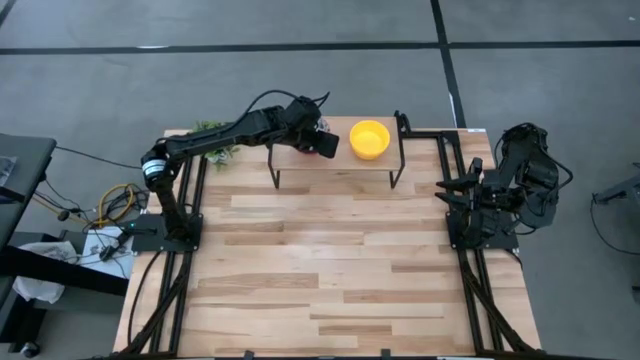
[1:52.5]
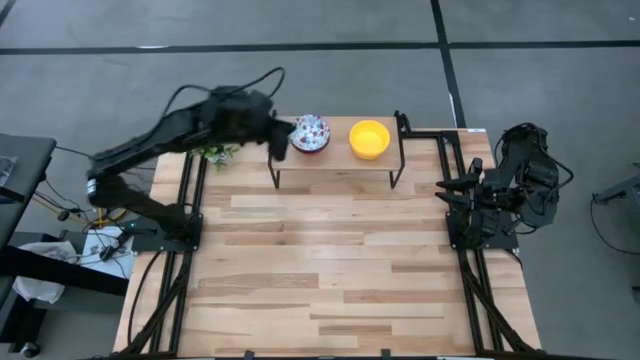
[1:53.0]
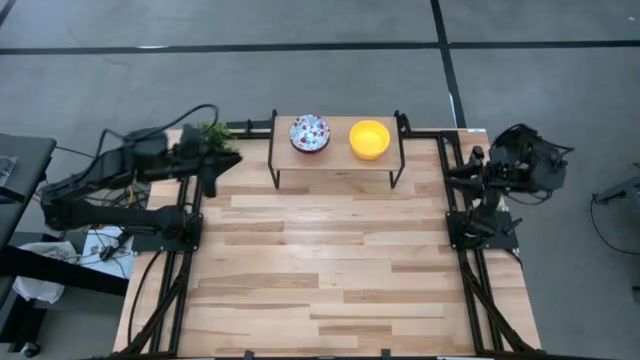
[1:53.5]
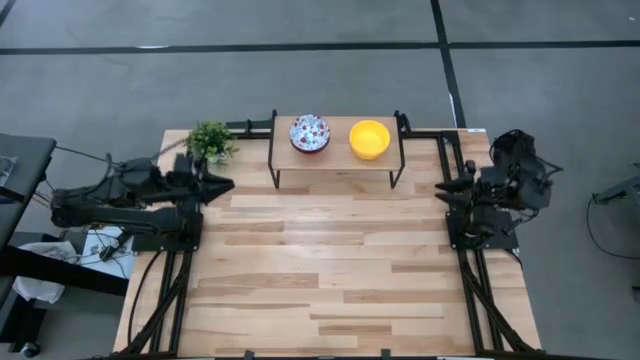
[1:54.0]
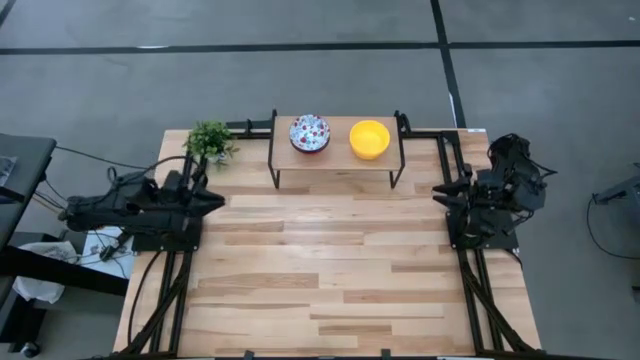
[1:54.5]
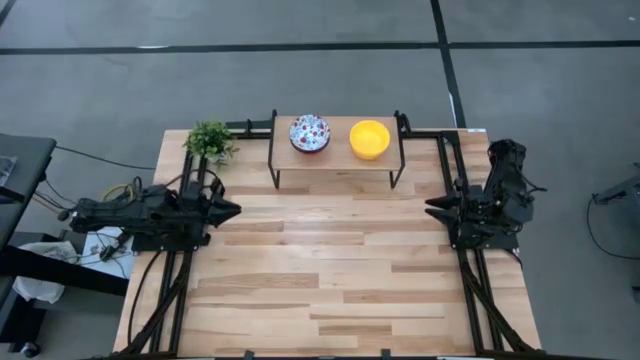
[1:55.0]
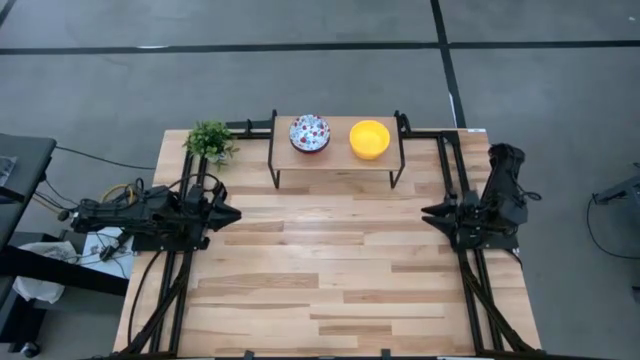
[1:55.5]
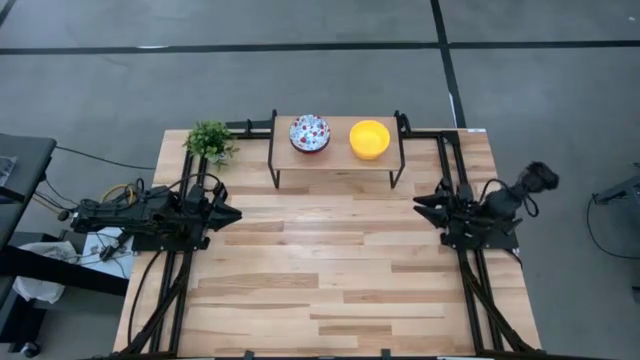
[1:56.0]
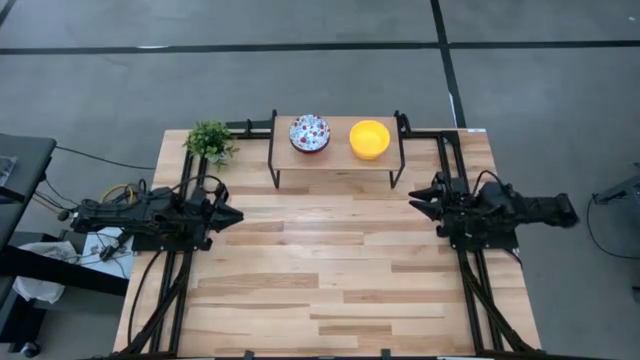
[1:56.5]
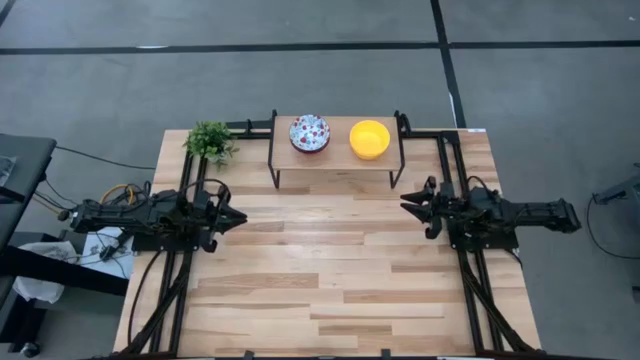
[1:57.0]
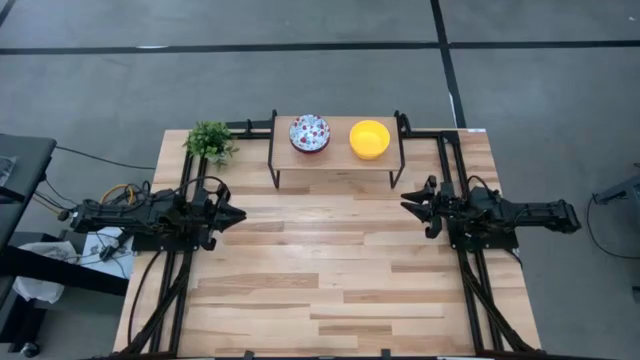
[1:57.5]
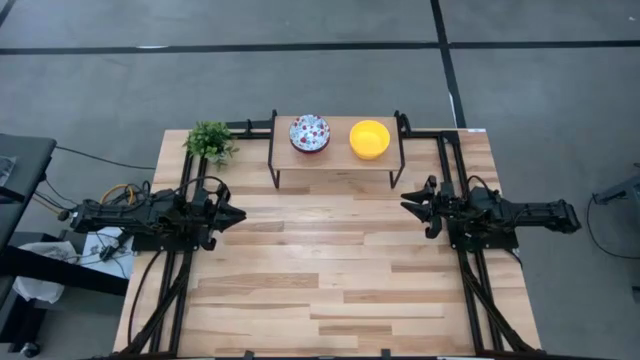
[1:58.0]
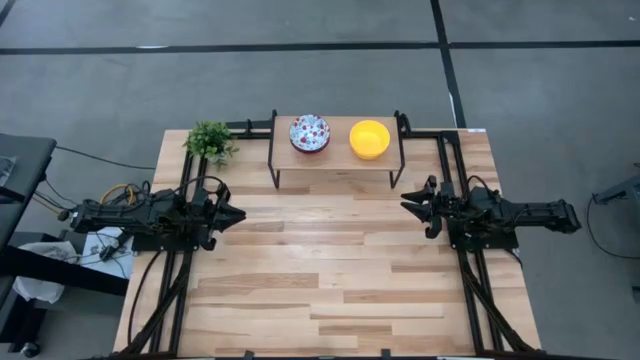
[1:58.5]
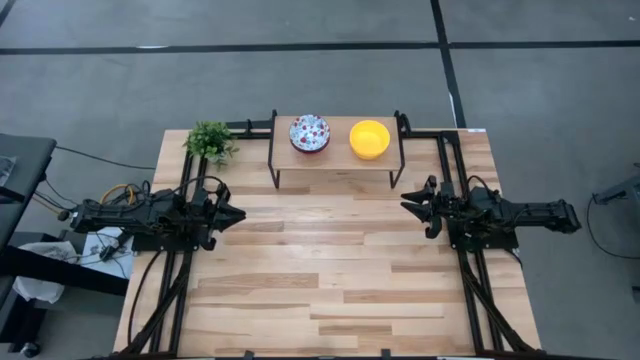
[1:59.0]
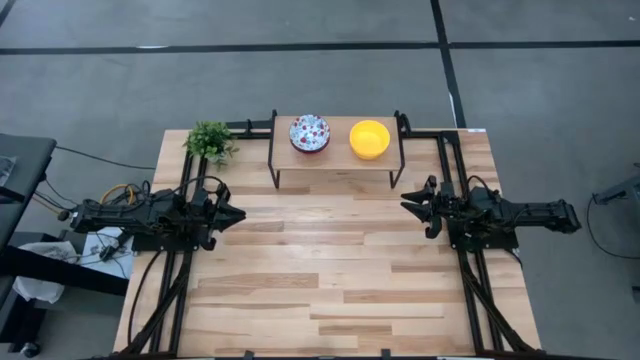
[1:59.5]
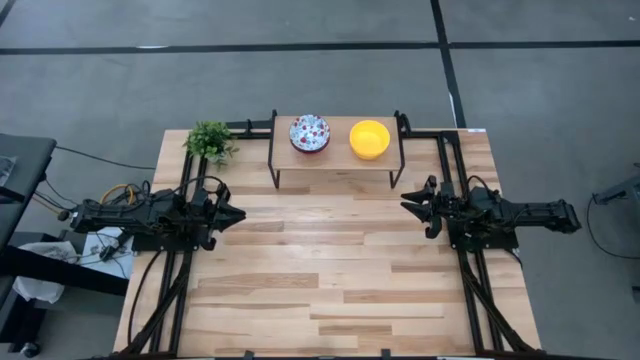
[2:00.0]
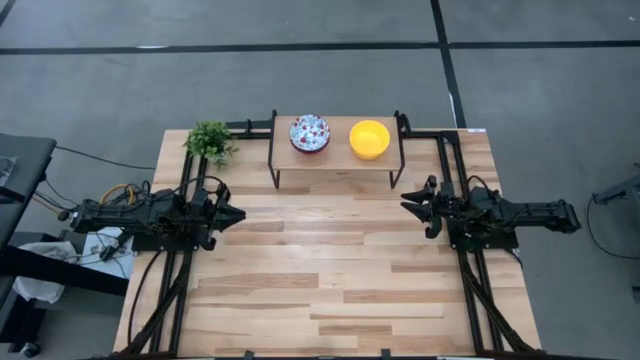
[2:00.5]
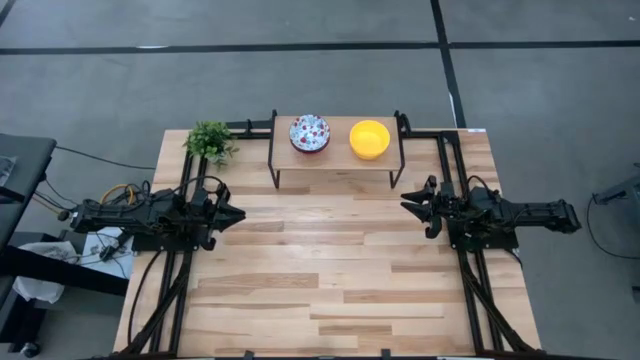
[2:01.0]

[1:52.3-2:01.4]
Task: Pick & Place Mini bowls
Return to Home Position

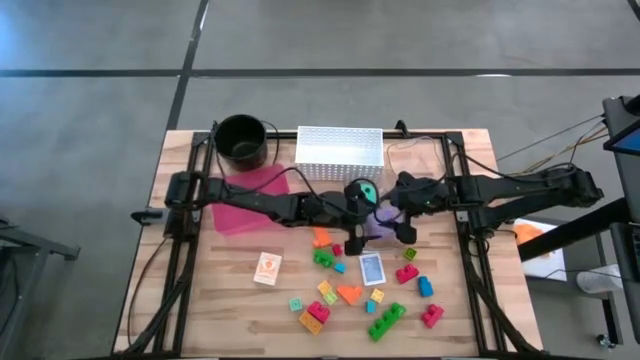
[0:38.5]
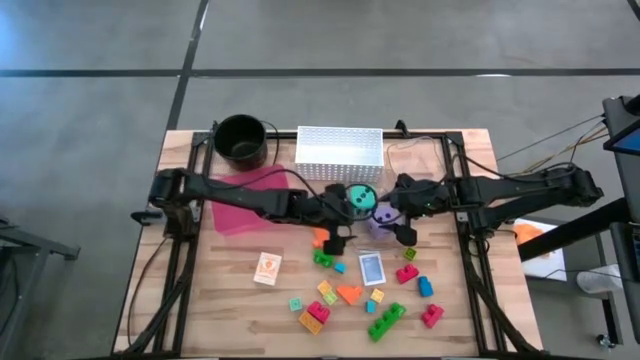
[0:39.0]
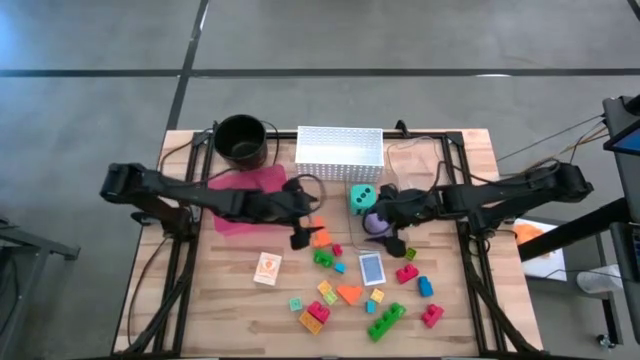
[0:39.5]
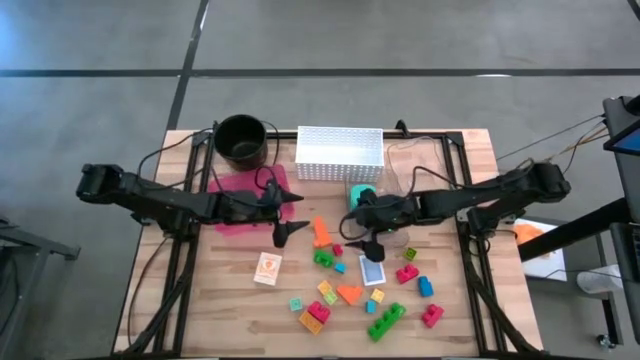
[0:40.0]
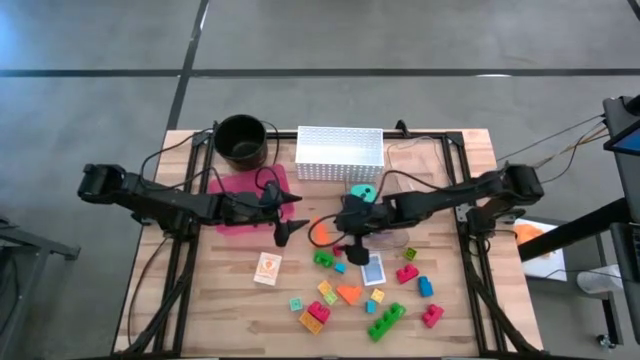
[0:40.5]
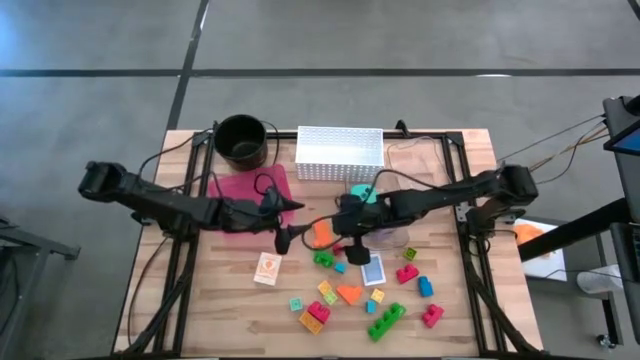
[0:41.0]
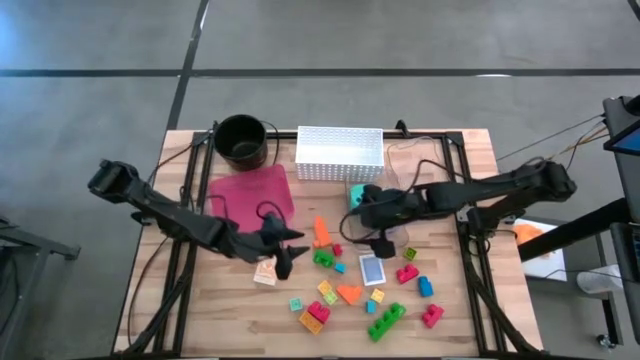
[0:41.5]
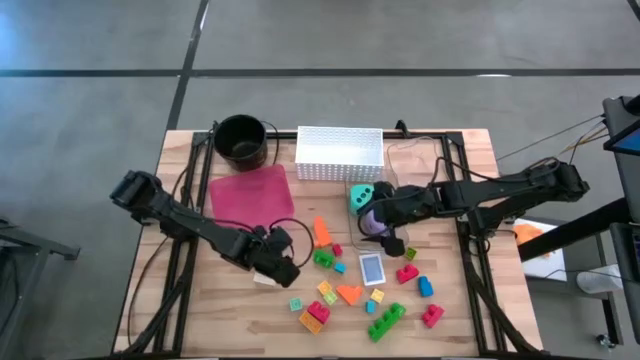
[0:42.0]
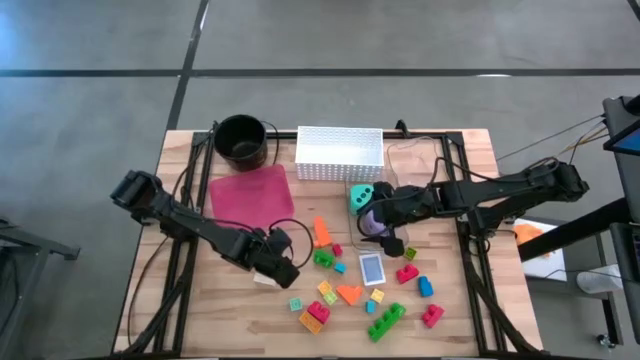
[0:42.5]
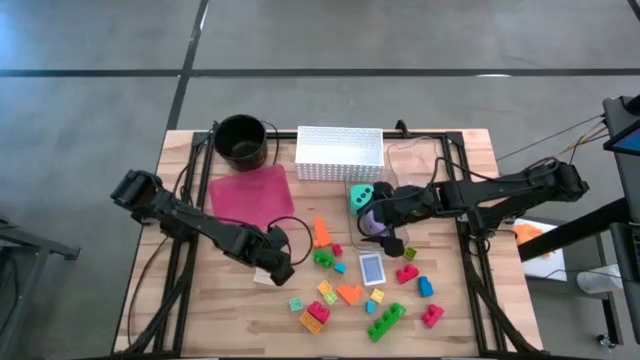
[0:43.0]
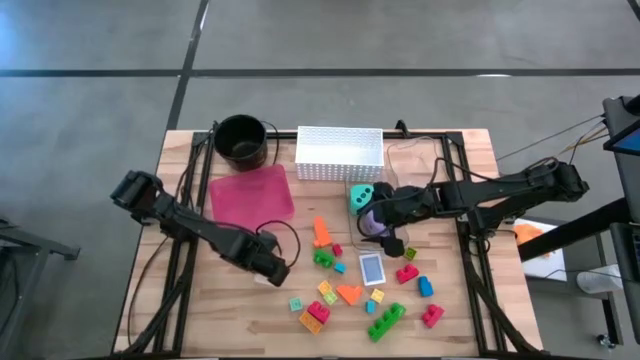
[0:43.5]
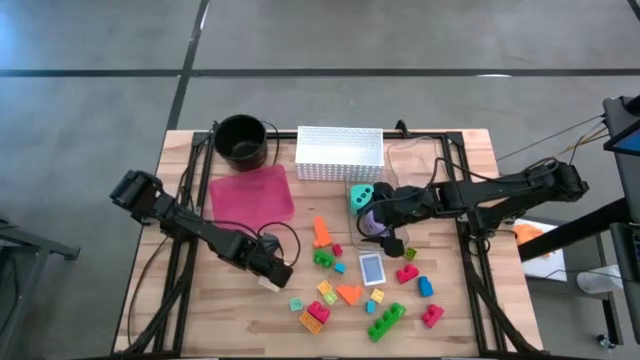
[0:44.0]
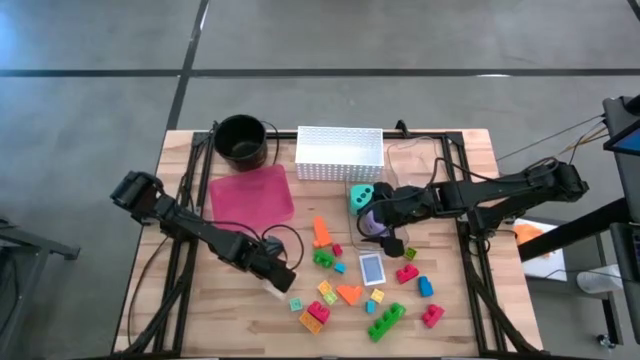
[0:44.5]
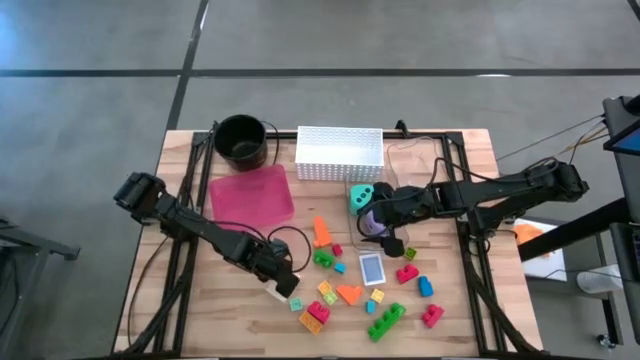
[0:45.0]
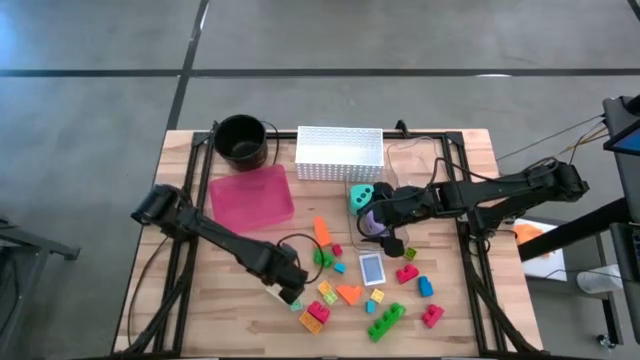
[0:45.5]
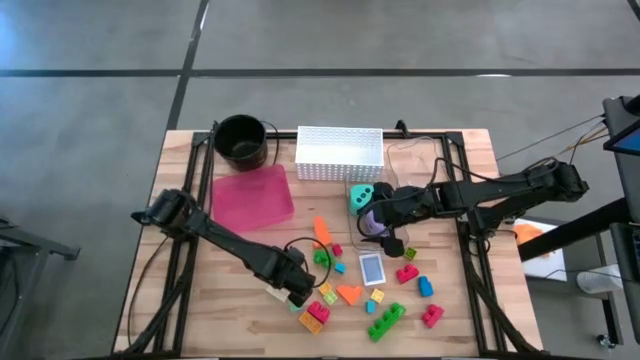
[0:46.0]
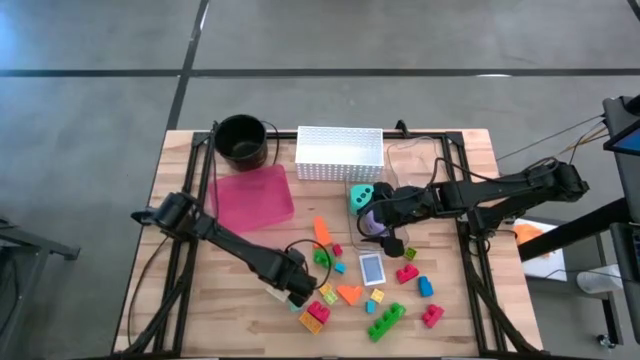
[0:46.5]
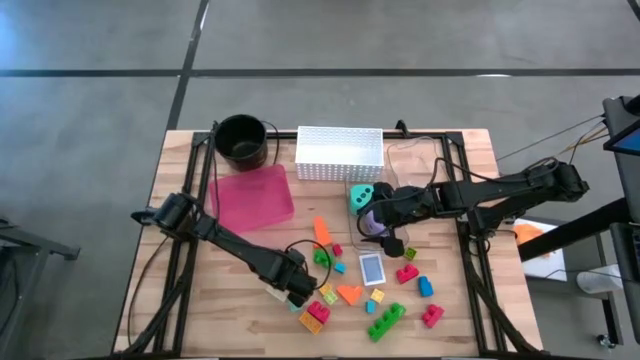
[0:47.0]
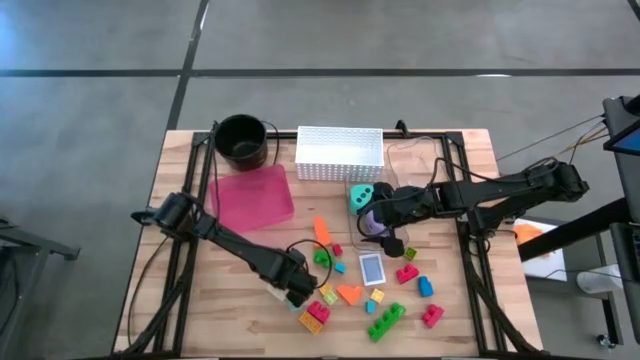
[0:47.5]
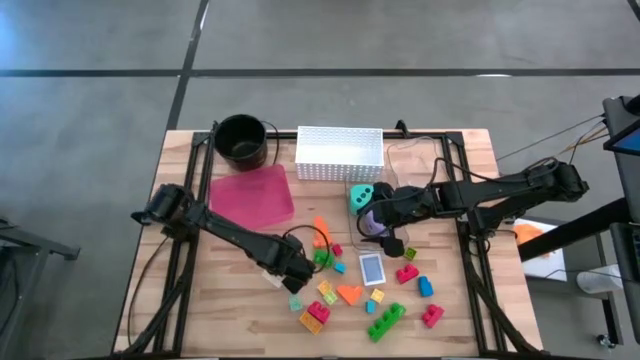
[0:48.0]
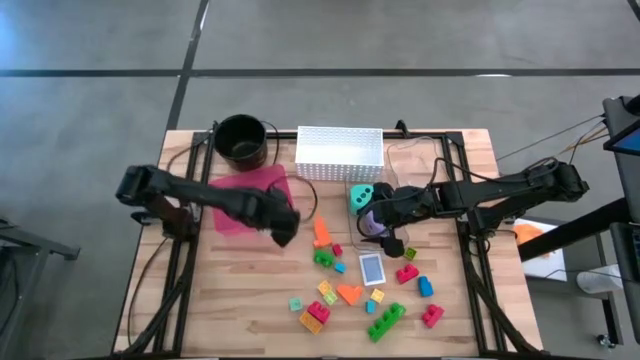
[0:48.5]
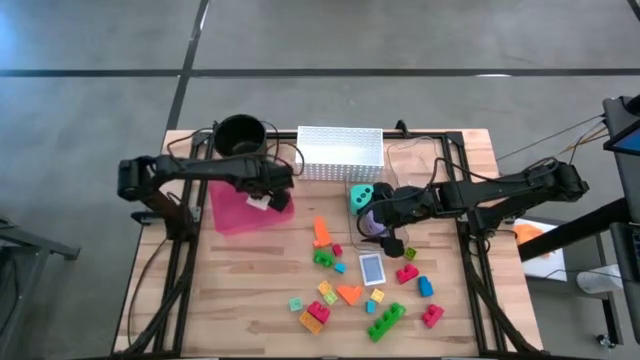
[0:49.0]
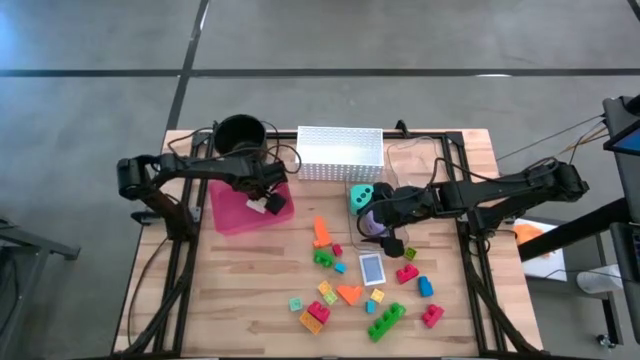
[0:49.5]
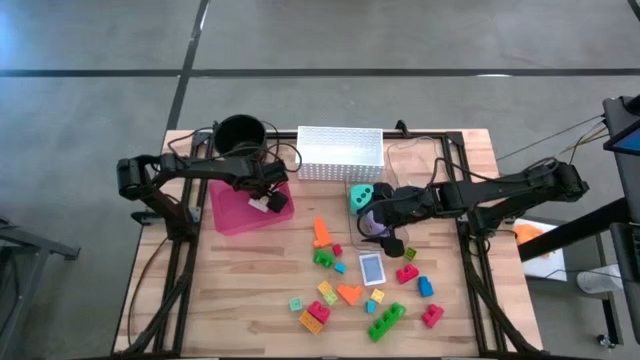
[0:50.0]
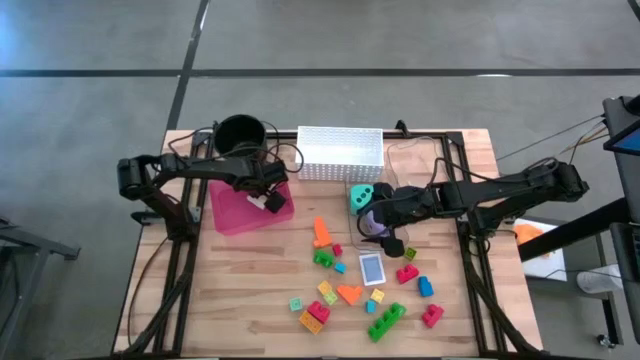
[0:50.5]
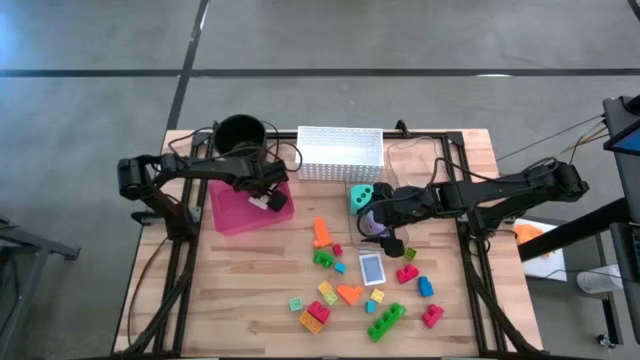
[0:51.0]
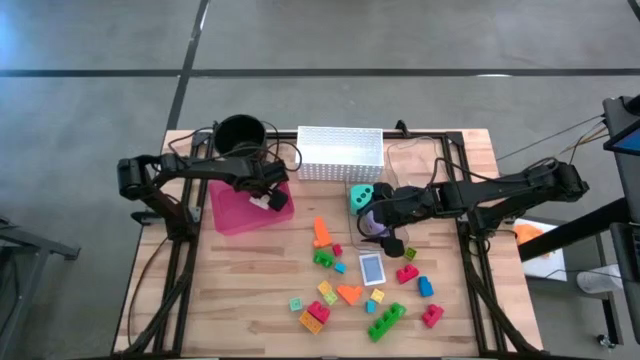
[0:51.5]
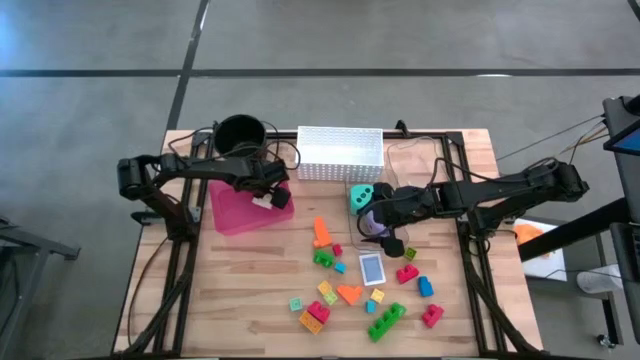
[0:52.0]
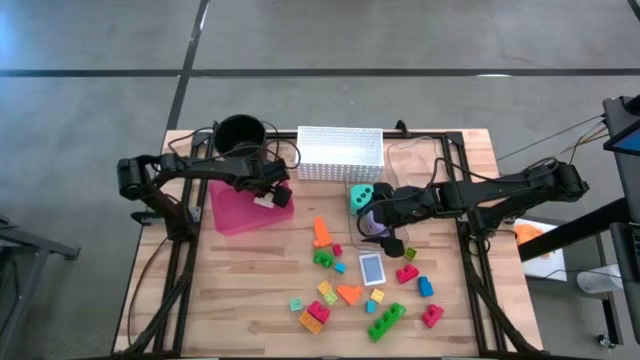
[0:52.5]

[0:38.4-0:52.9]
Task: Pick & Place Toys
Put the yellow game card into the pink bin
